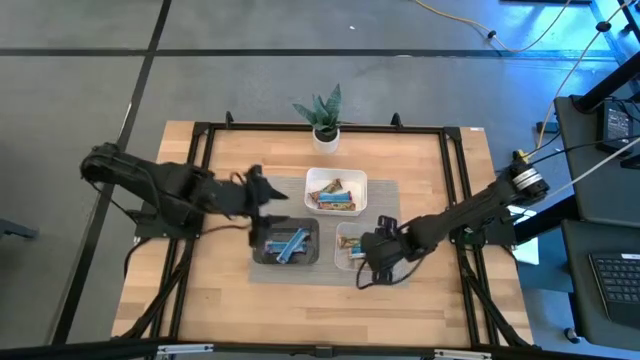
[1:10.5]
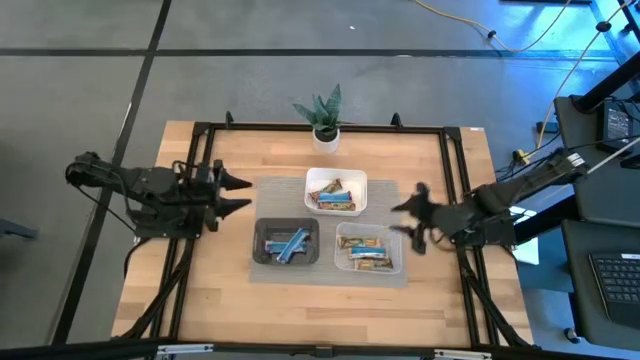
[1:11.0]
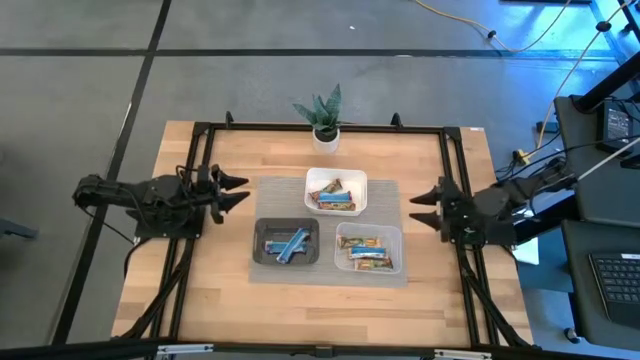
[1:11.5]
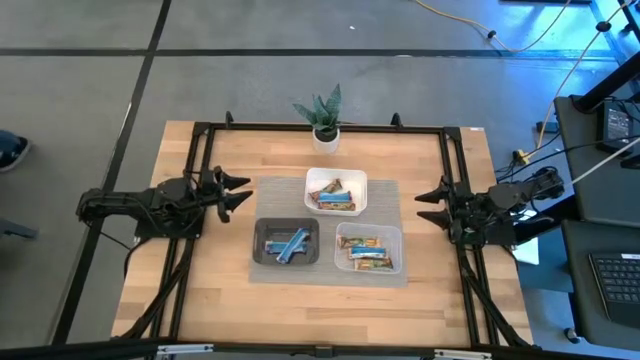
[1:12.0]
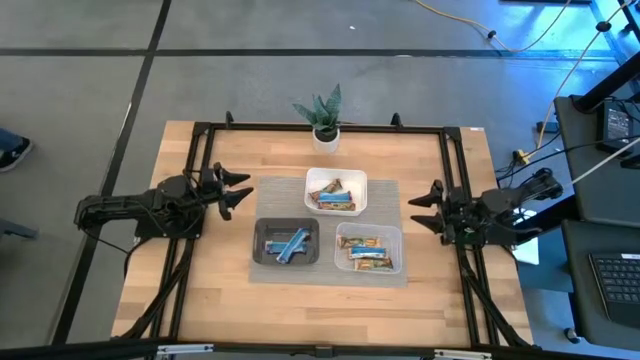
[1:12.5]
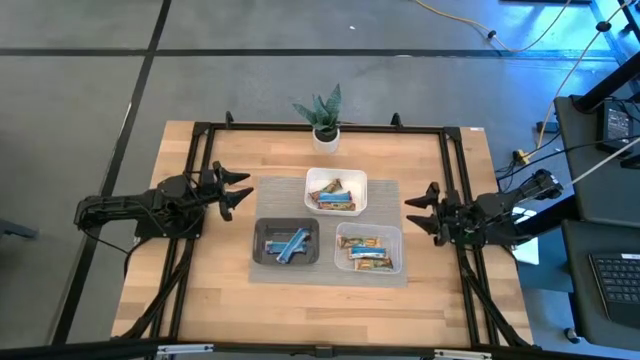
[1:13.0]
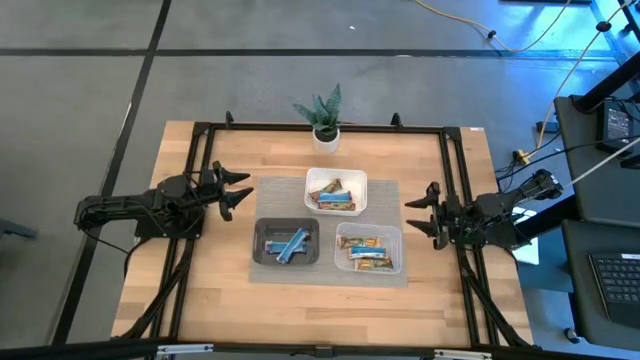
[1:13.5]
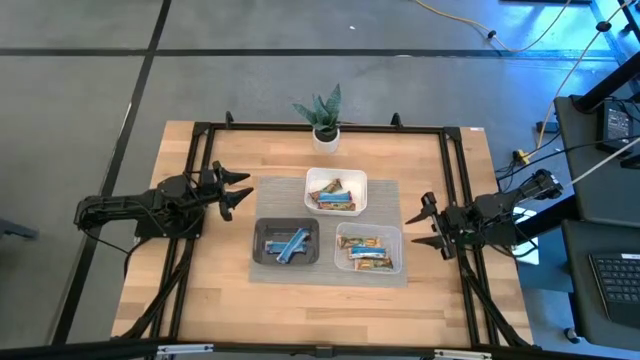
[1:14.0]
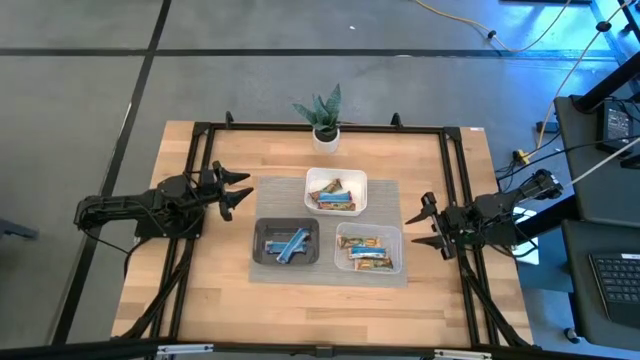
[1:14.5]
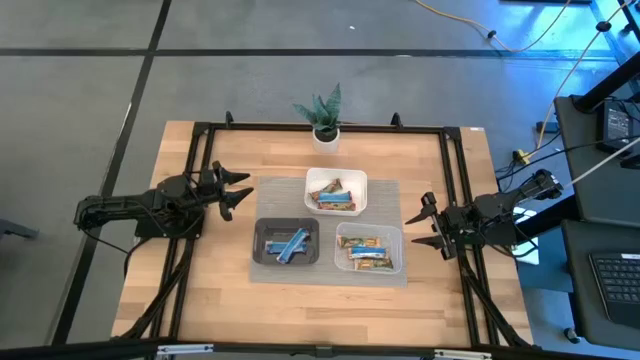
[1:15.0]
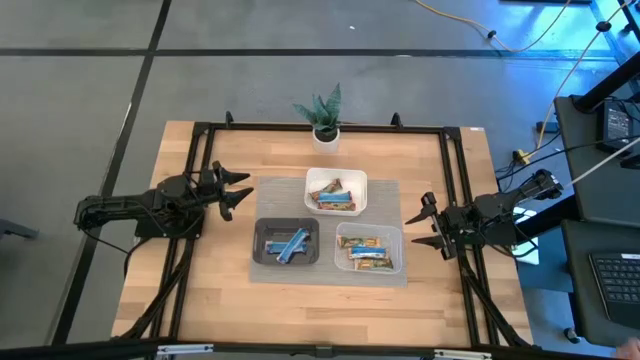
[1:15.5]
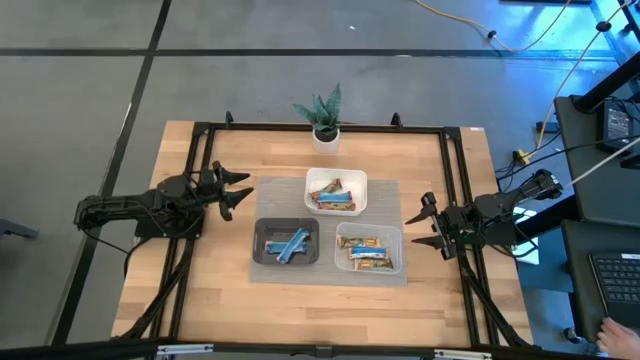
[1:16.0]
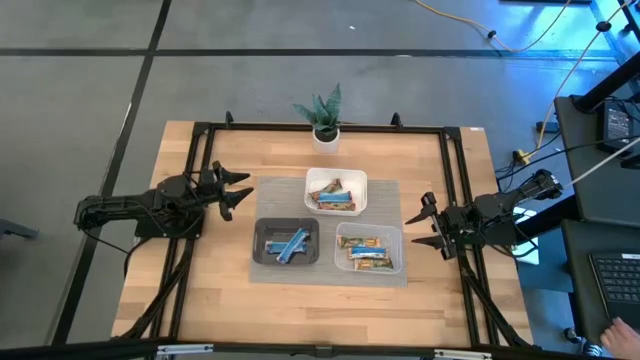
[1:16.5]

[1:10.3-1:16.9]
Task: Pick and place Granola Bars by type
Return to Home Position

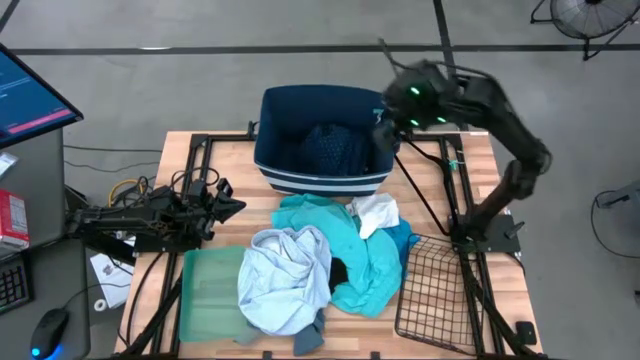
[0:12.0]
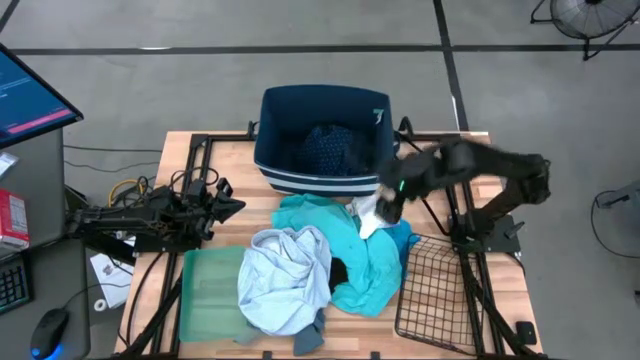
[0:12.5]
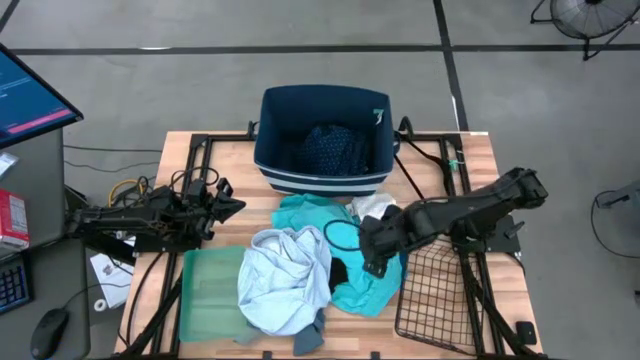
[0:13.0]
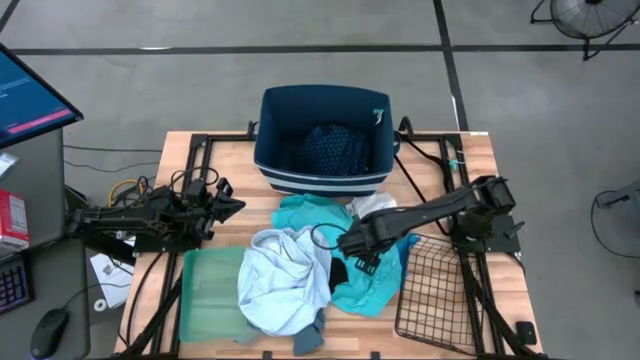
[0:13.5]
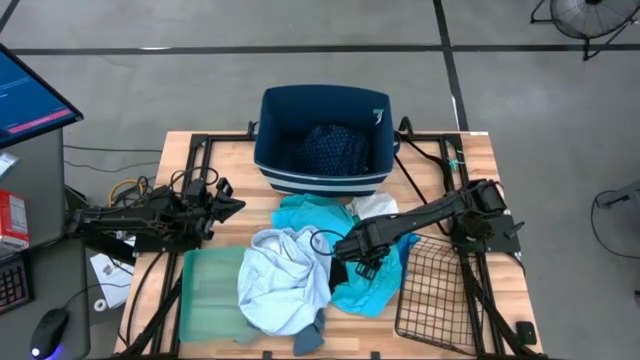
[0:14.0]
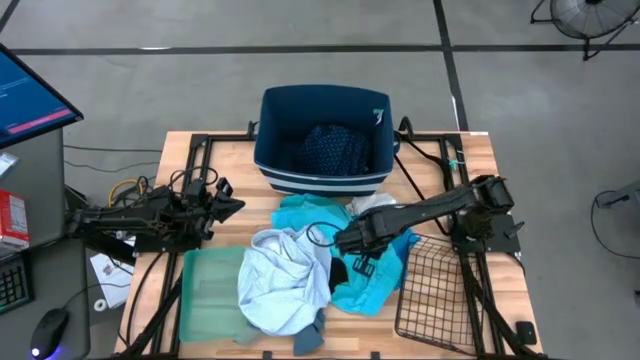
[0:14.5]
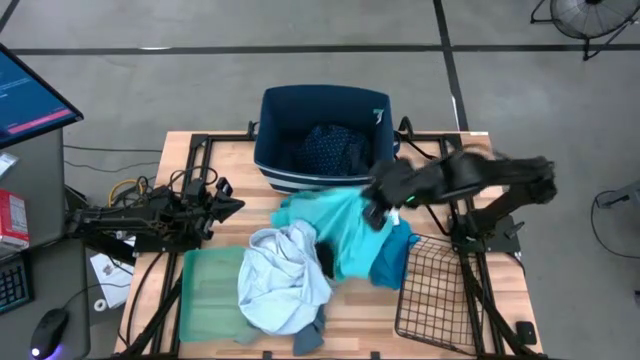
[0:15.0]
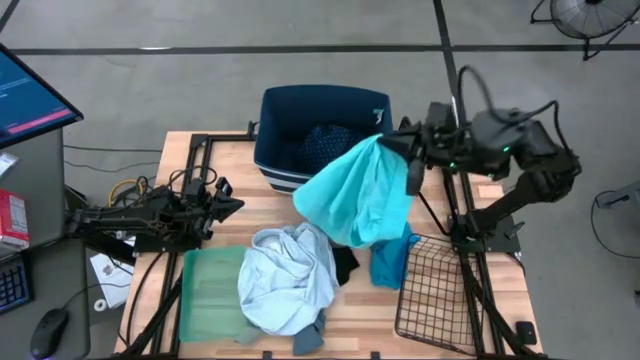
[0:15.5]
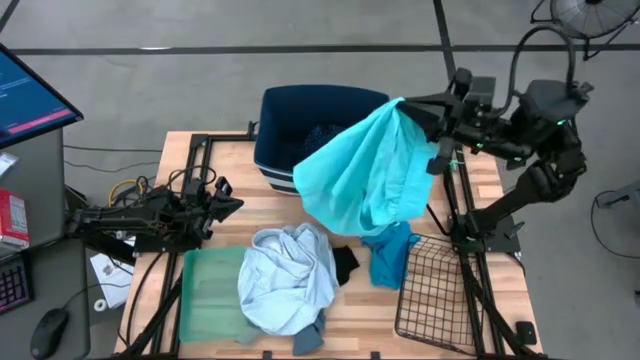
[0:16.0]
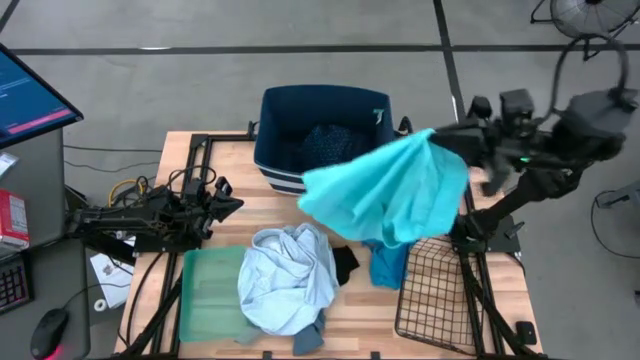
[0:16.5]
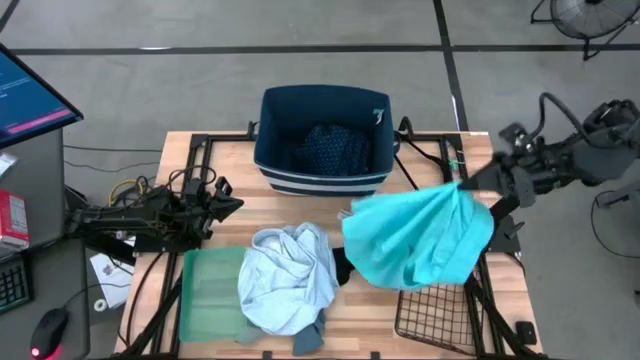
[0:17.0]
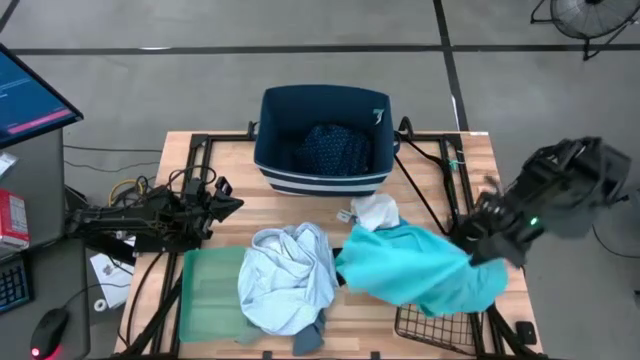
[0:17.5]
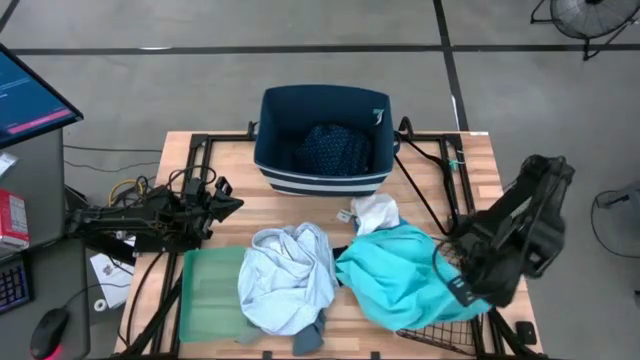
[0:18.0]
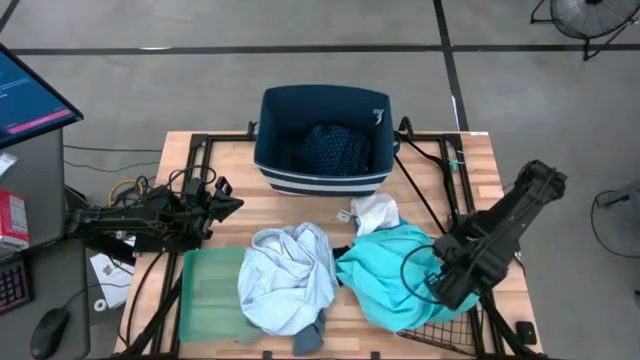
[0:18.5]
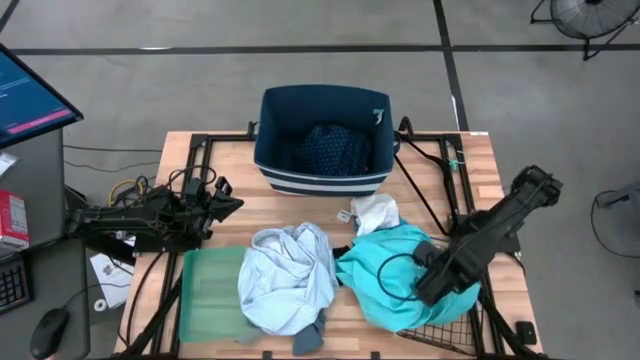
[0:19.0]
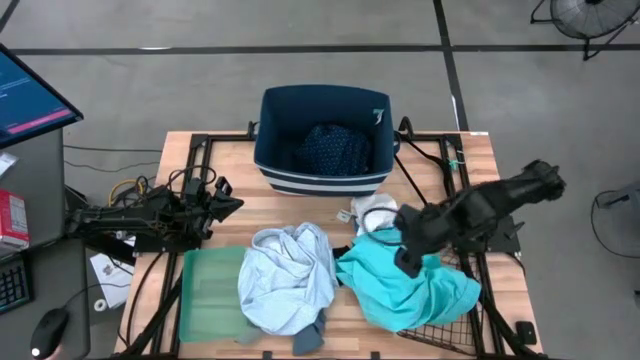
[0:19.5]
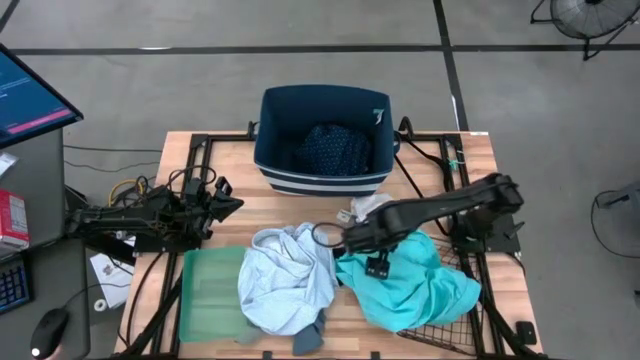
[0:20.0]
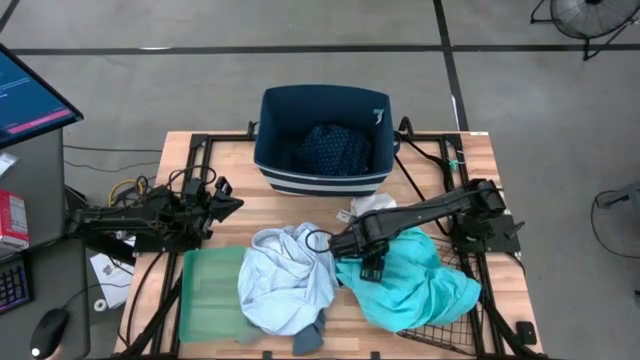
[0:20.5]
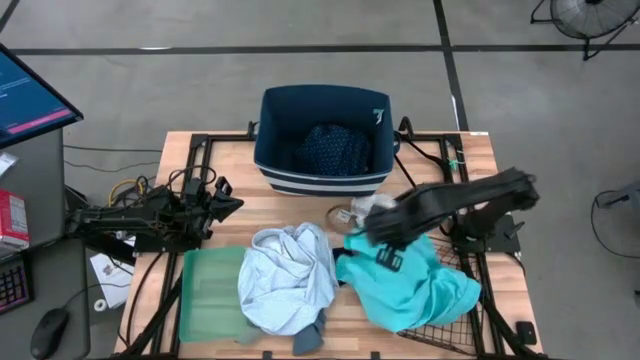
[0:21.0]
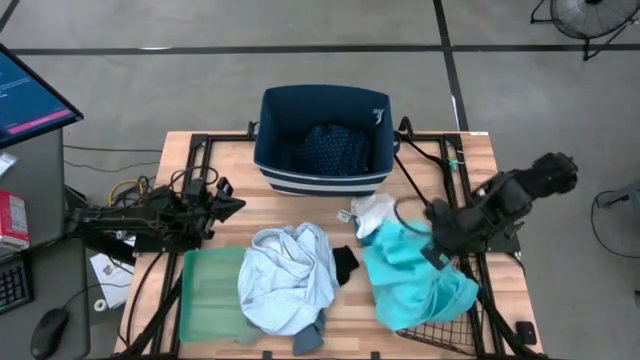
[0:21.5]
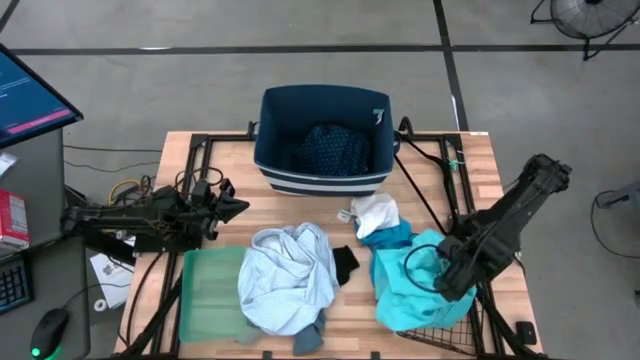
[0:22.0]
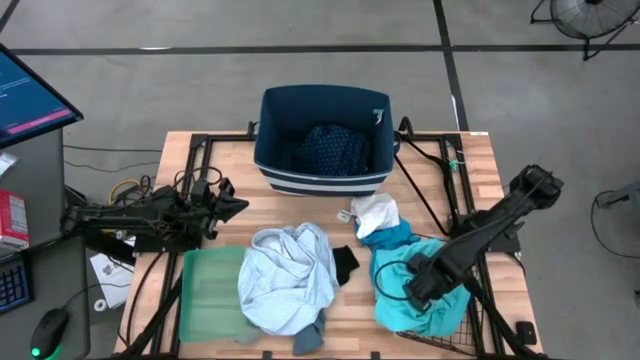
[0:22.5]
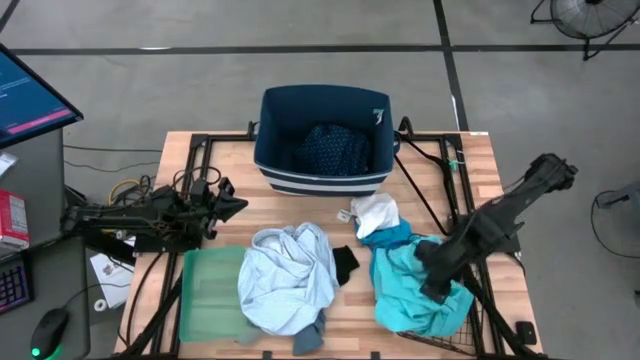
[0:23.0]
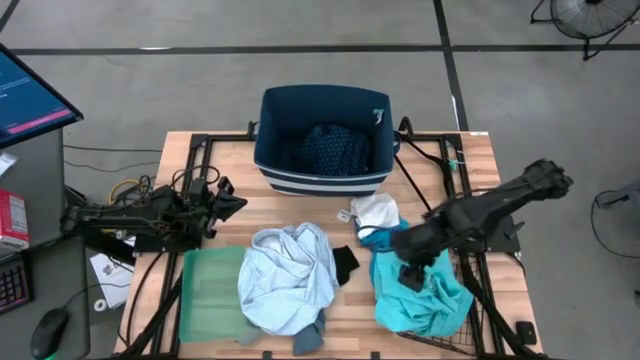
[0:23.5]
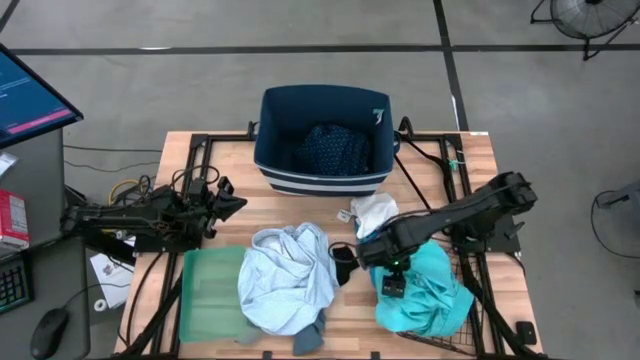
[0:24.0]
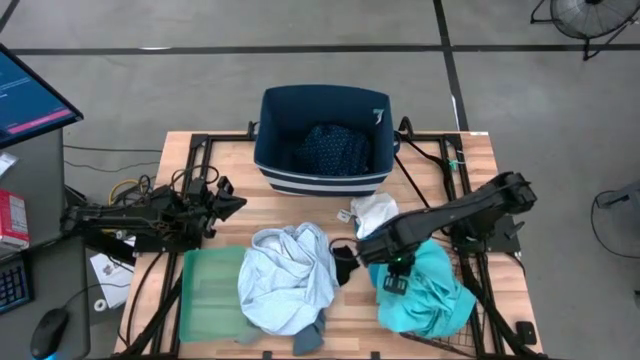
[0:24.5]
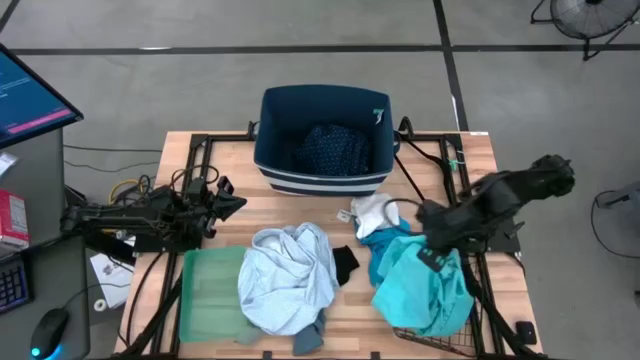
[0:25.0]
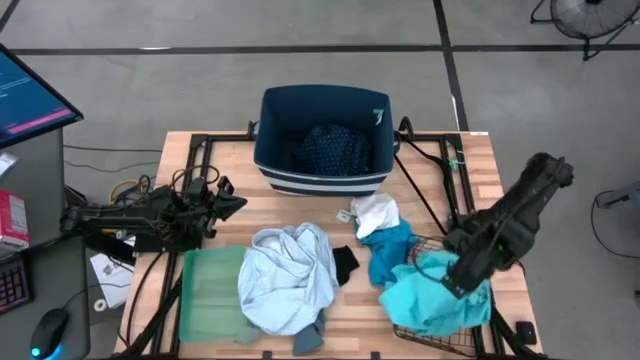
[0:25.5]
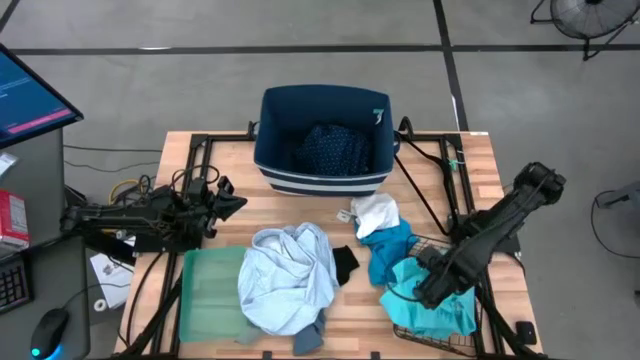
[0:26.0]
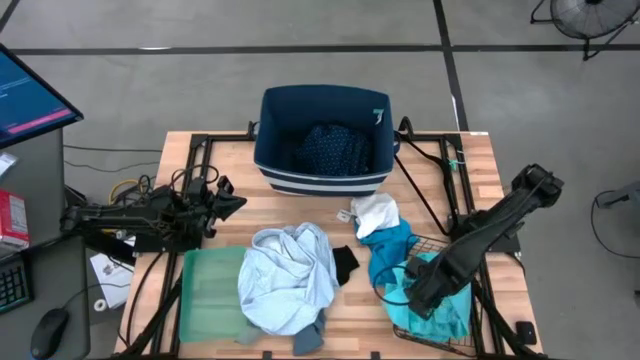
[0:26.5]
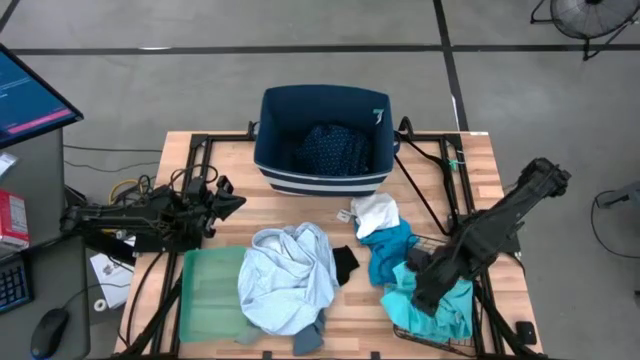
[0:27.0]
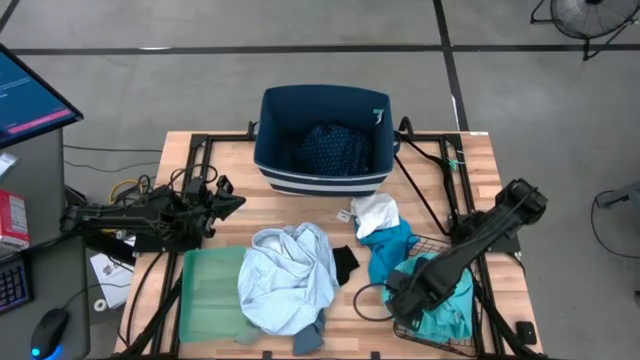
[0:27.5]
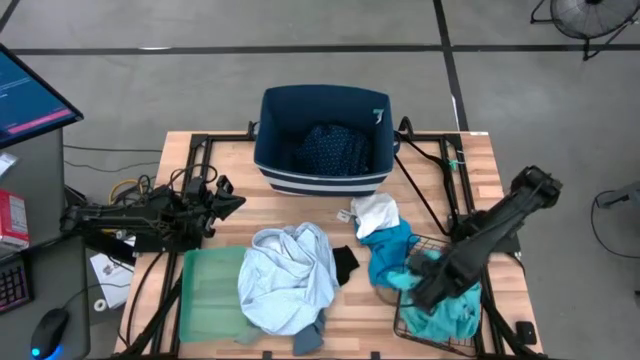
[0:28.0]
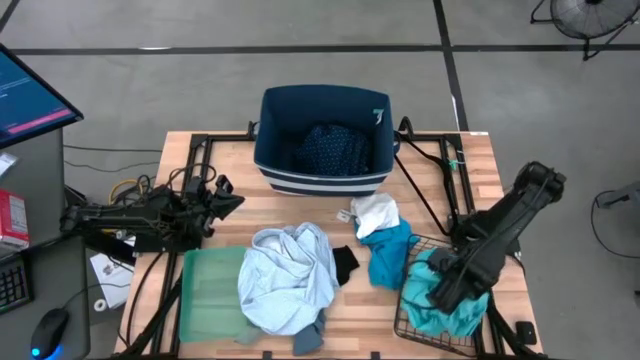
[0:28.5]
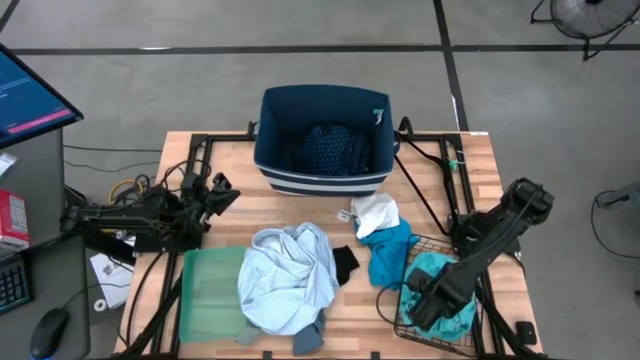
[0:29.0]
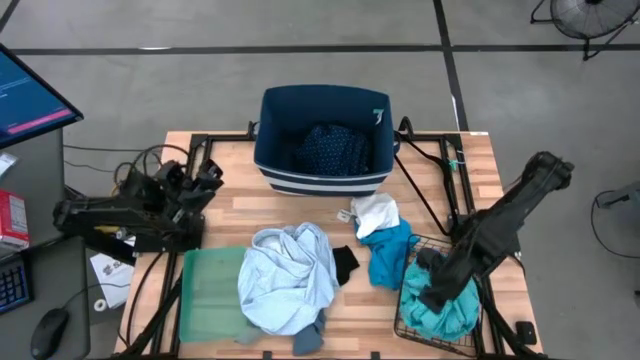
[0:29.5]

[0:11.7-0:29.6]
Task: Pick & Place Cloths
Put the light blue shorts into the wire basket
